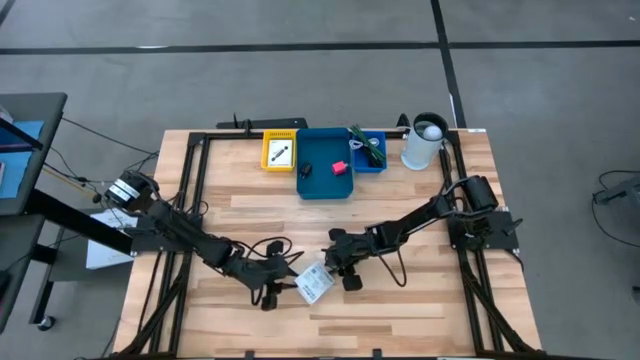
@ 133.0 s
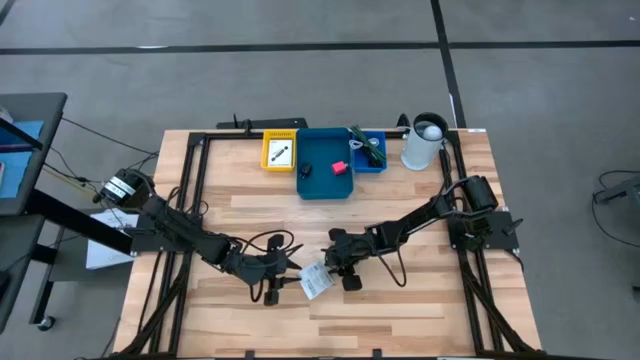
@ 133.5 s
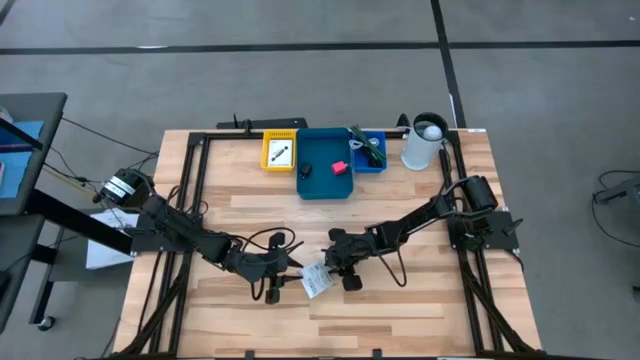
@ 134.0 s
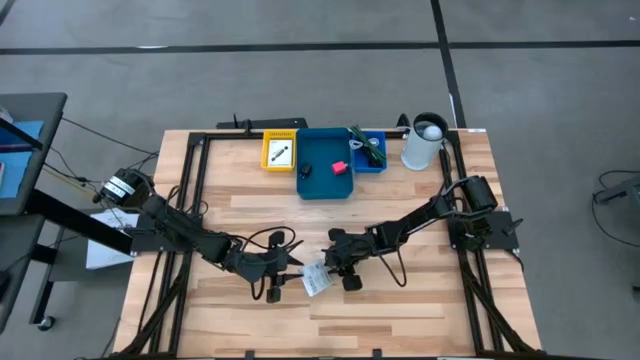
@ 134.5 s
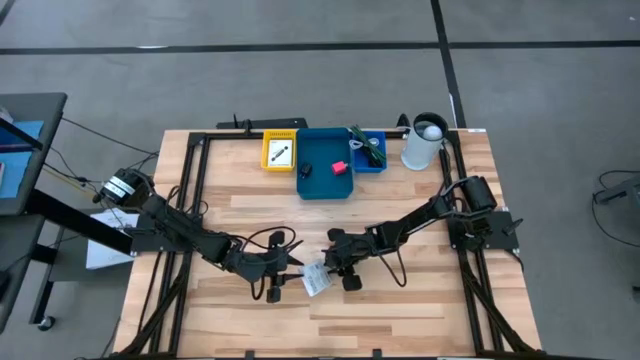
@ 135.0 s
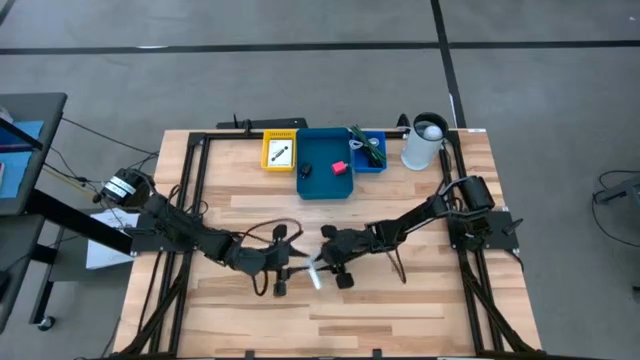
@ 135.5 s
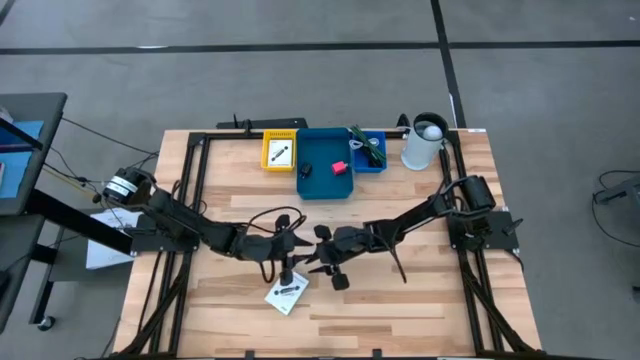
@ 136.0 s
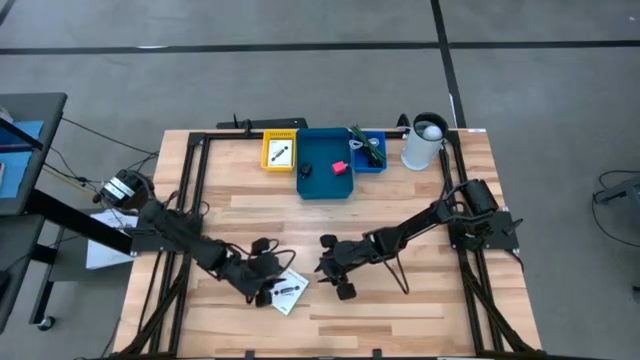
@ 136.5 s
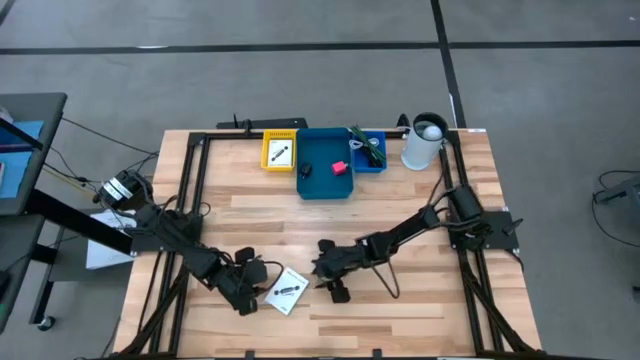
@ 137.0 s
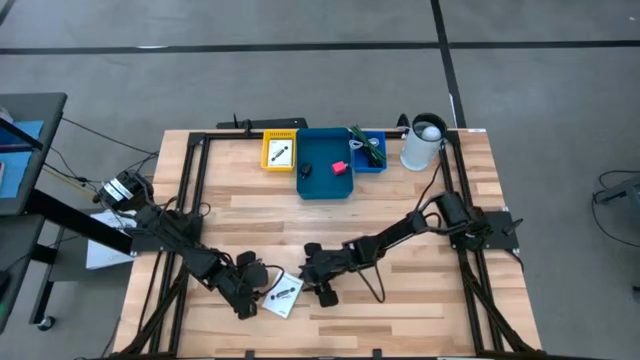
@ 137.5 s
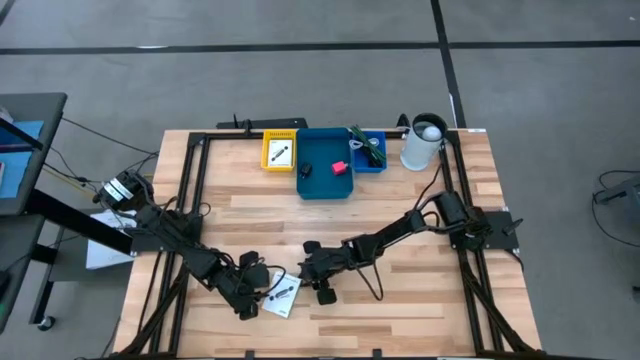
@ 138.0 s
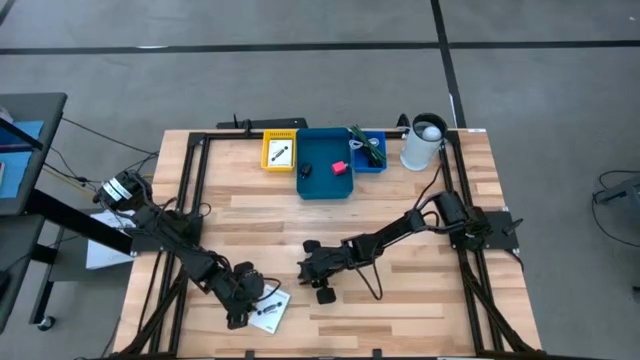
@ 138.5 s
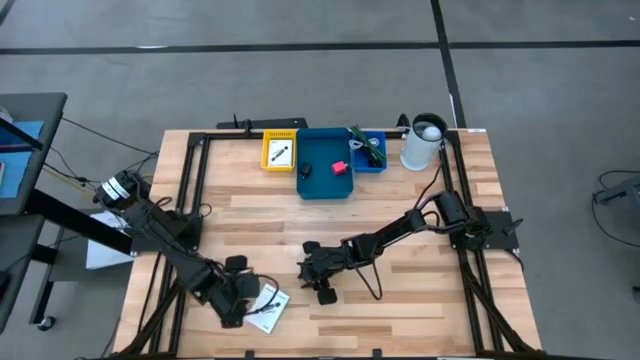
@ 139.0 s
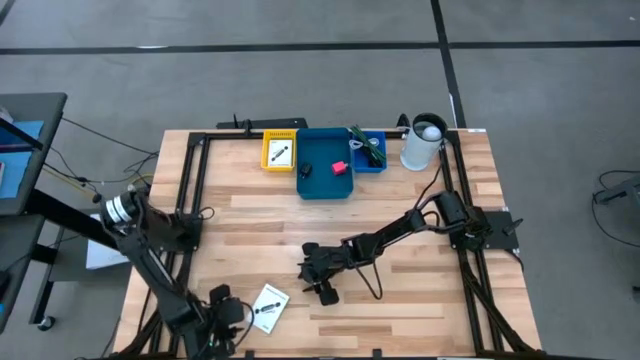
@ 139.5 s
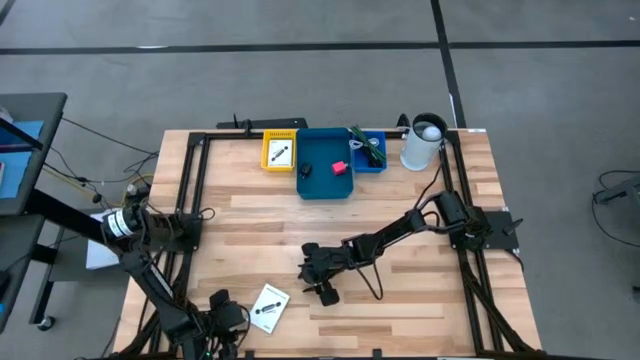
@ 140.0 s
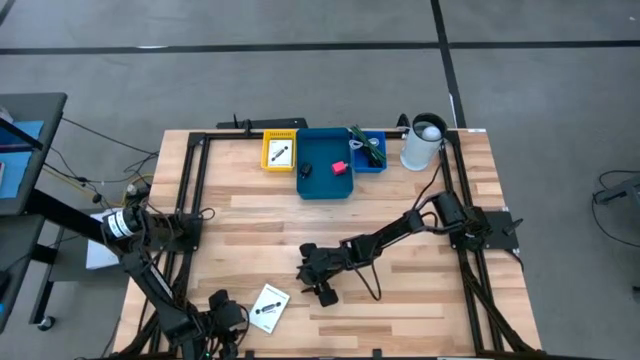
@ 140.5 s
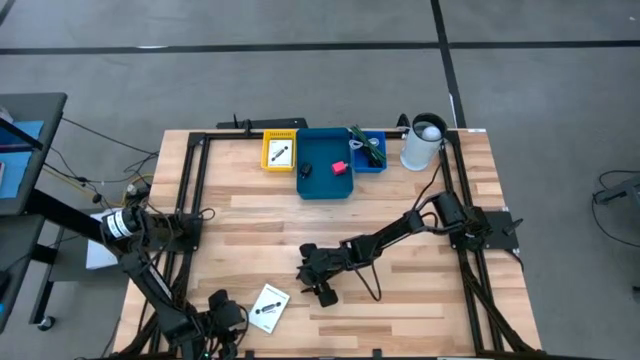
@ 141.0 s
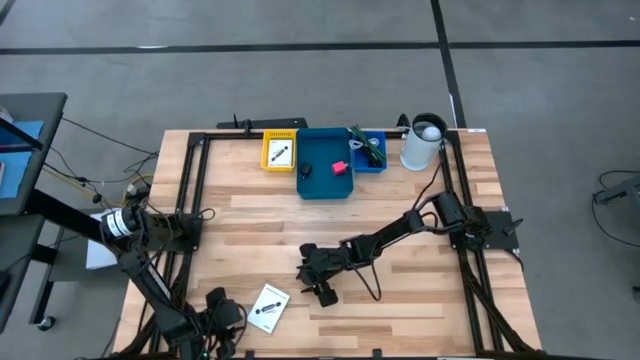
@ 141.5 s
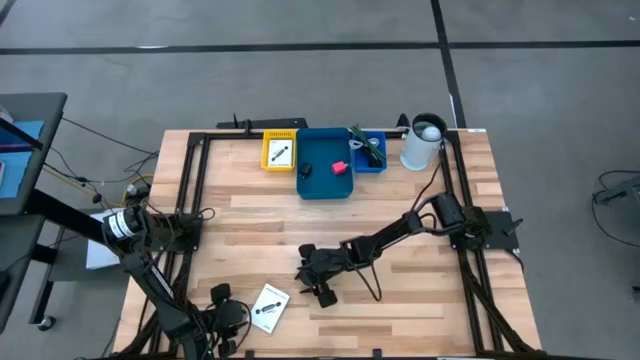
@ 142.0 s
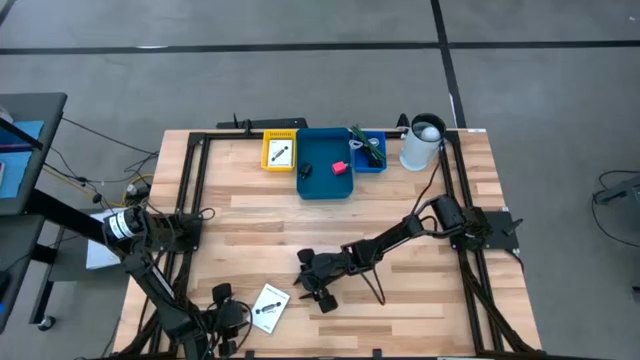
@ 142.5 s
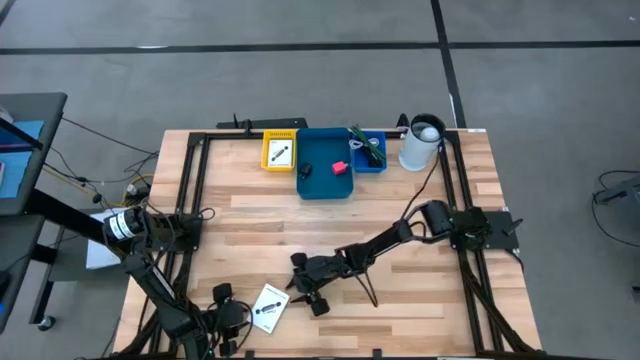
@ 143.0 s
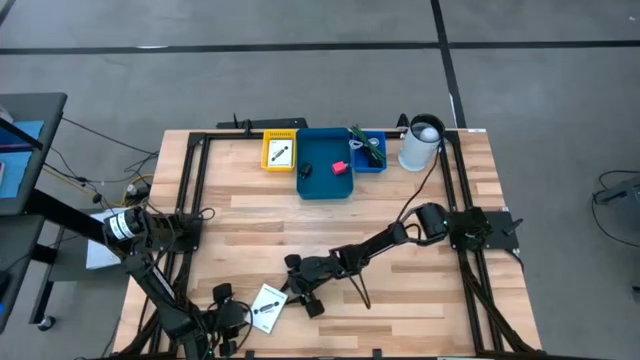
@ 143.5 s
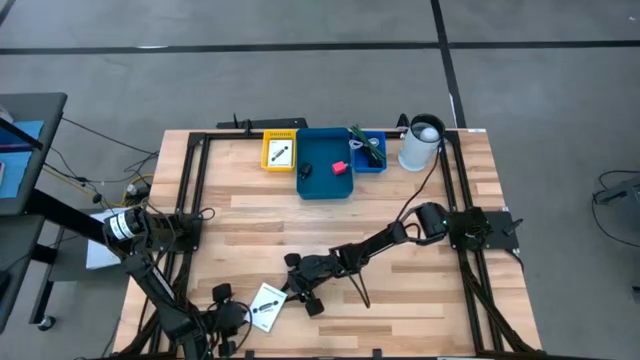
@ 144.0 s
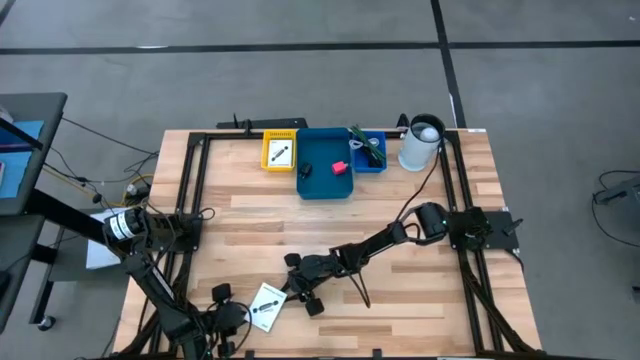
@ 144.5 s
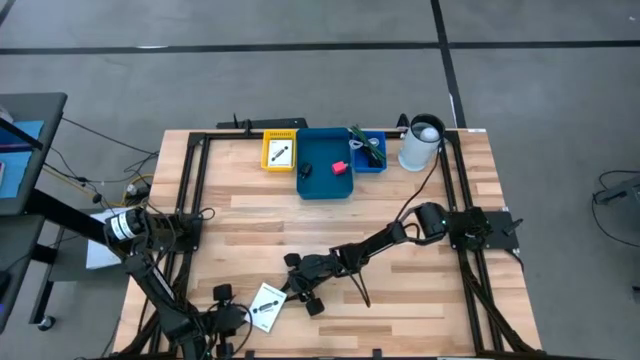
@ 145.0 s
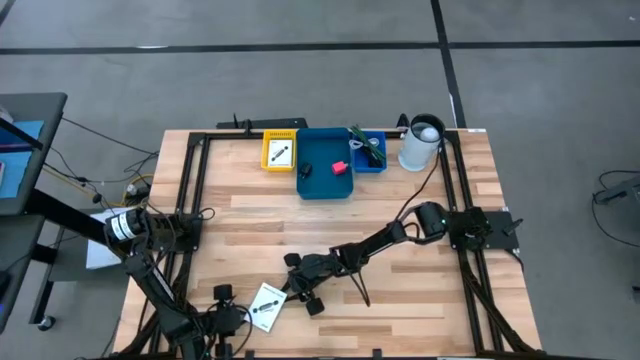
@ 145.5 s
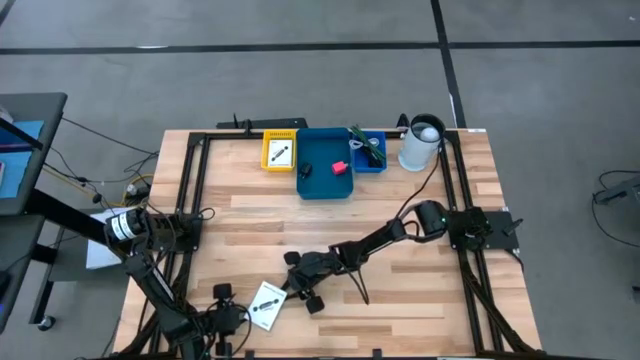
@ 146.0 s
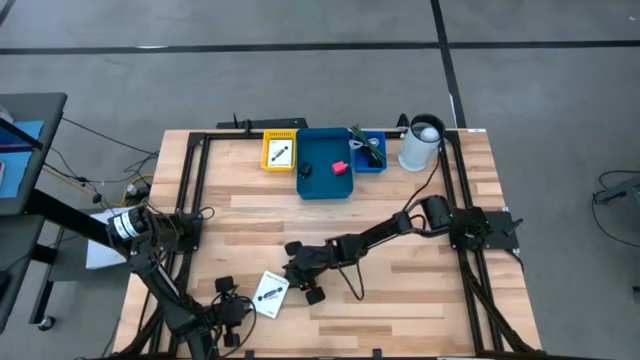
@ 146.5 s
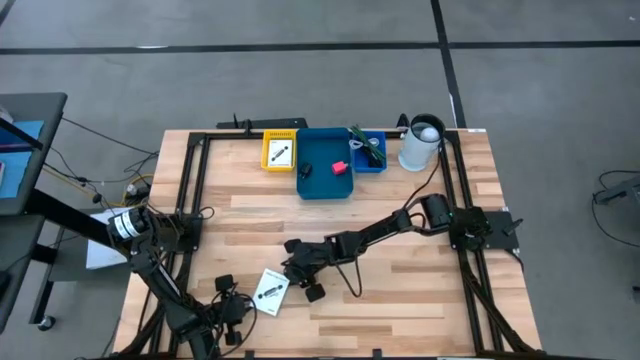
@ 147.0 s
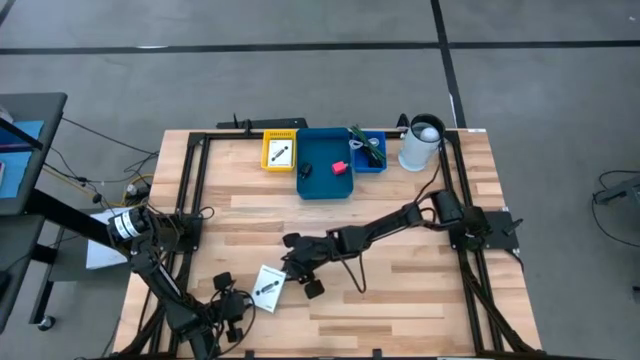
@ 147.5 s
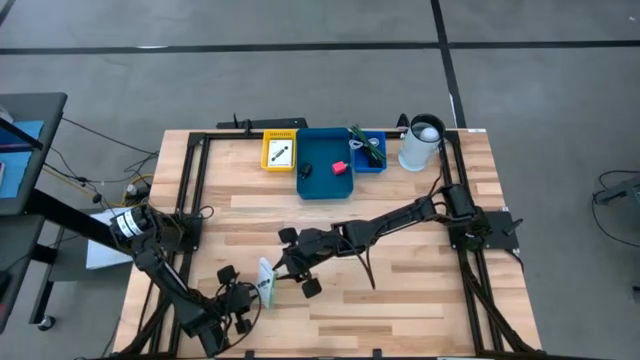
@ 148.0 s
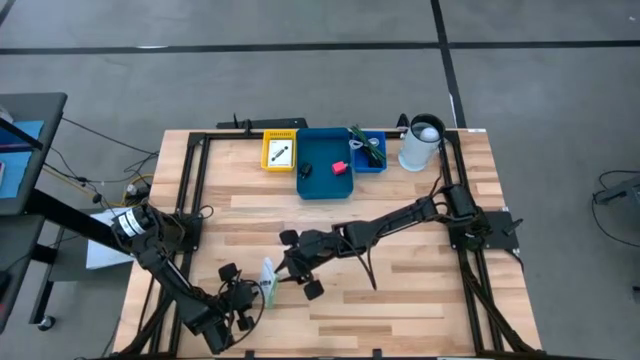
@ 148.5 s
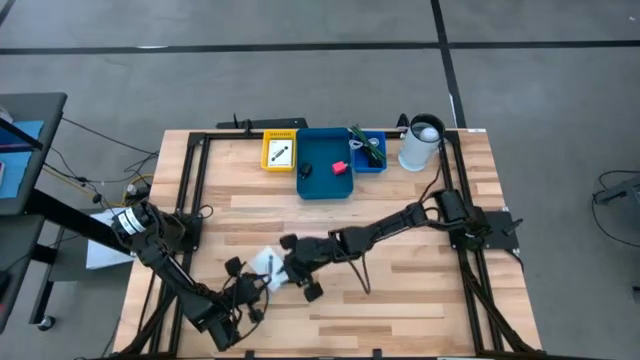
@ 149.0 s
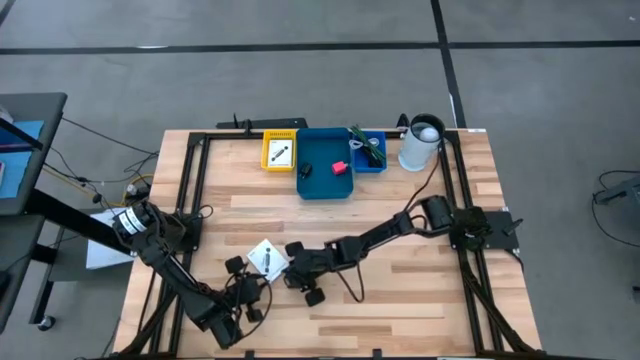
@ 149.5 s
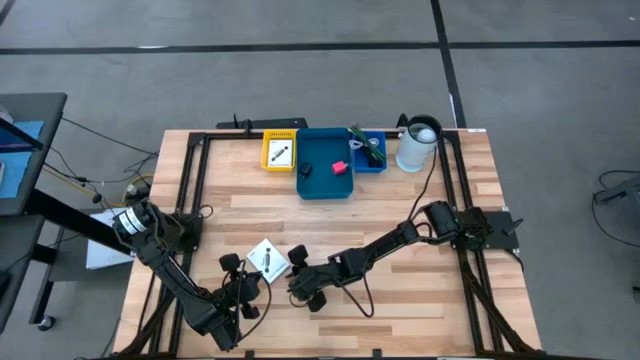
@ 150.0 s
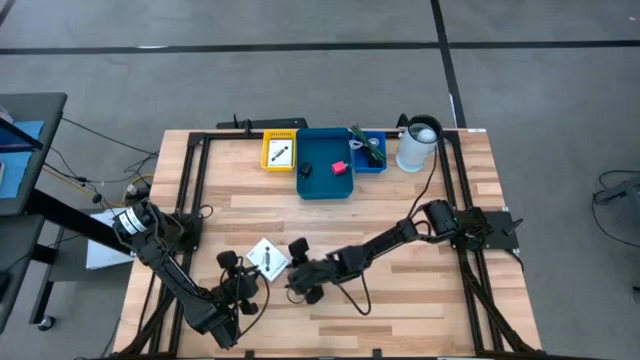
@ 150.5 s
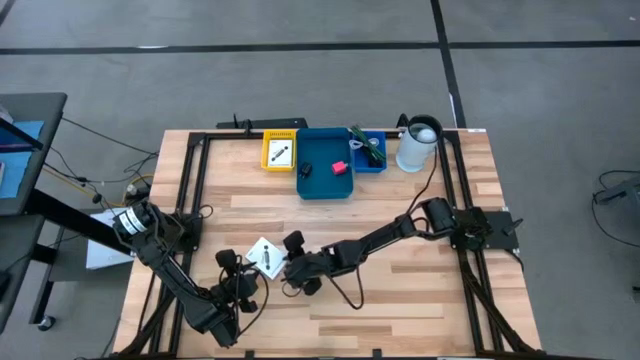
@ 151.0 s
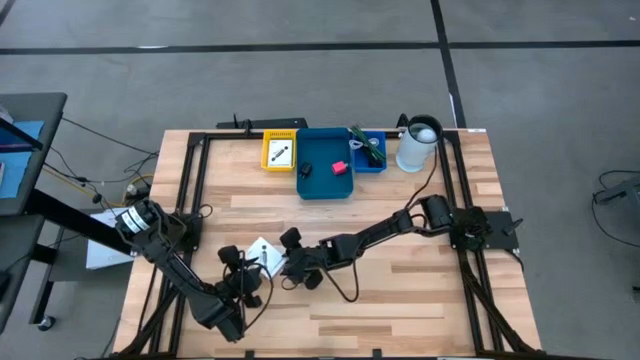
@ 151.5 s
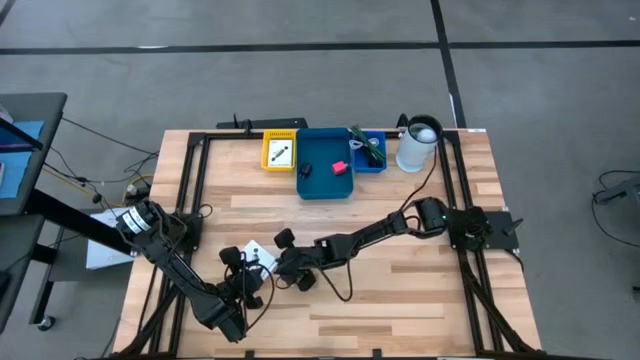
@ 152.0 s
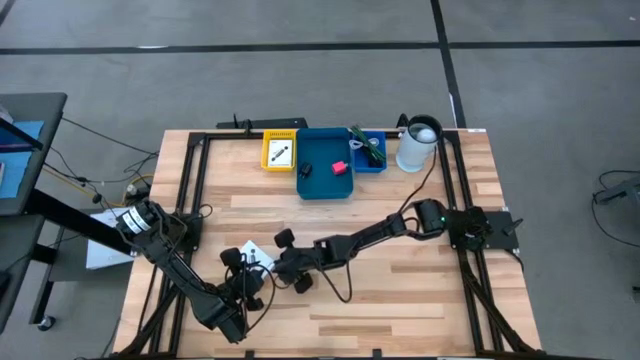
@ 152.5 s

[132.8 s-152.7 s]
Task: Pick and place items into bin
Put the card reader box into the yellow basket
